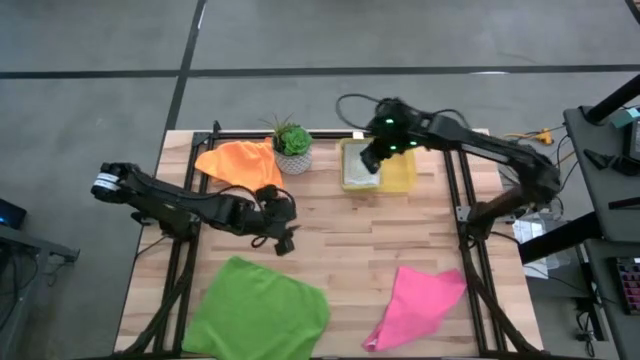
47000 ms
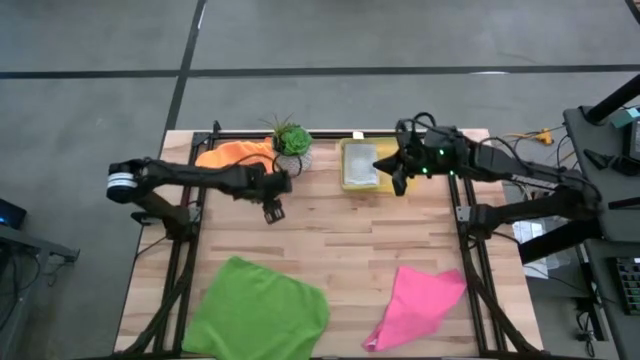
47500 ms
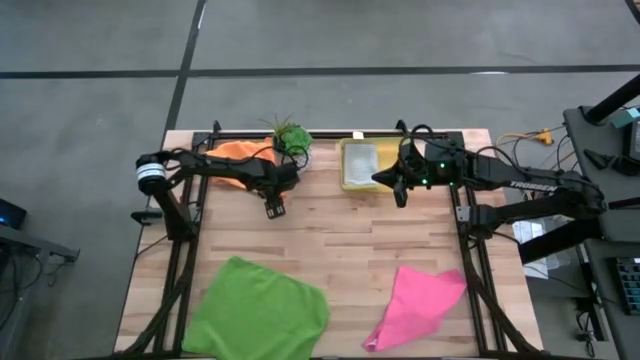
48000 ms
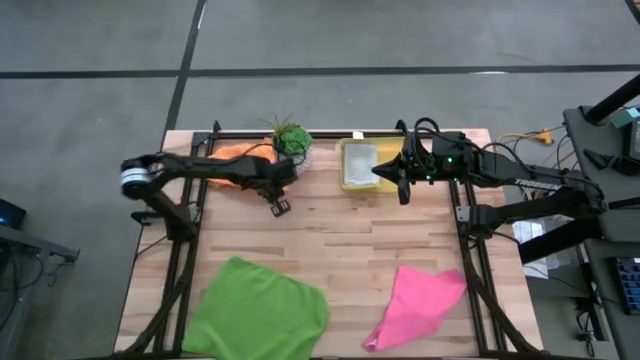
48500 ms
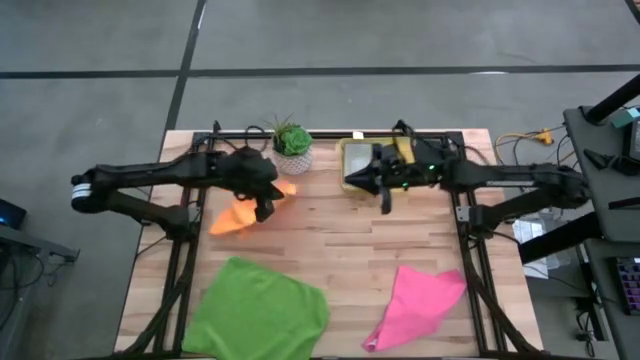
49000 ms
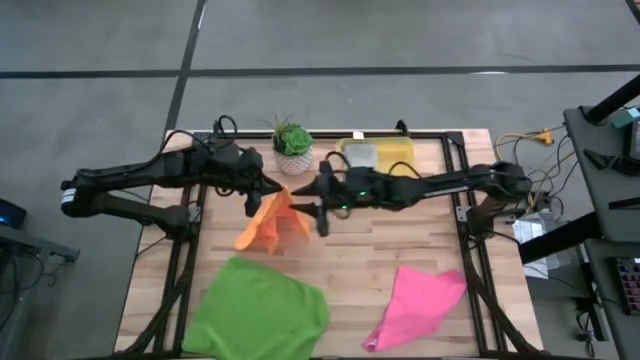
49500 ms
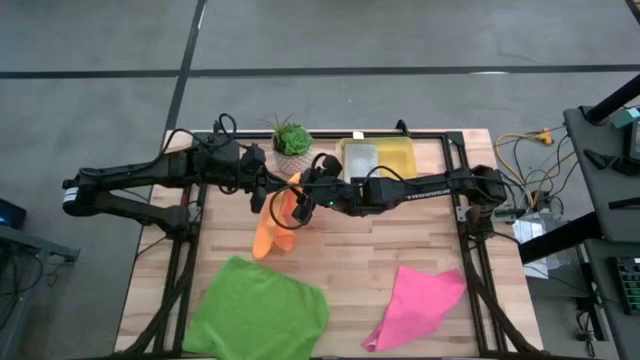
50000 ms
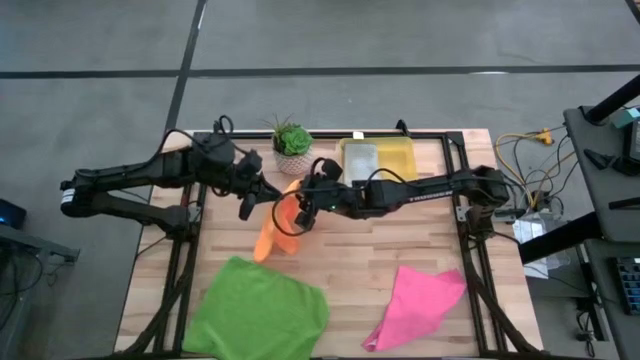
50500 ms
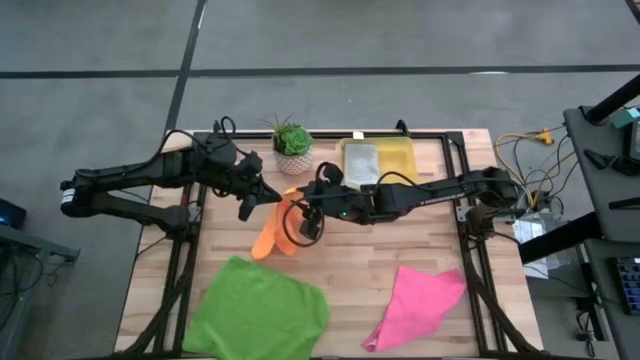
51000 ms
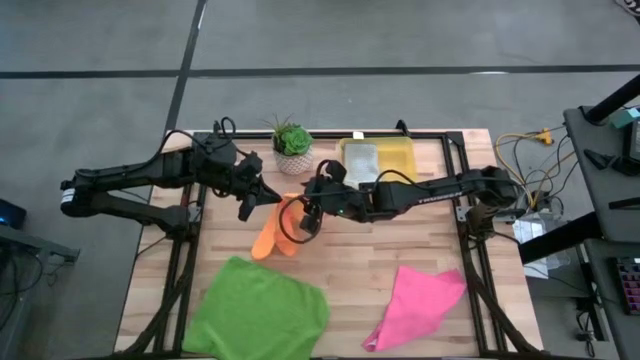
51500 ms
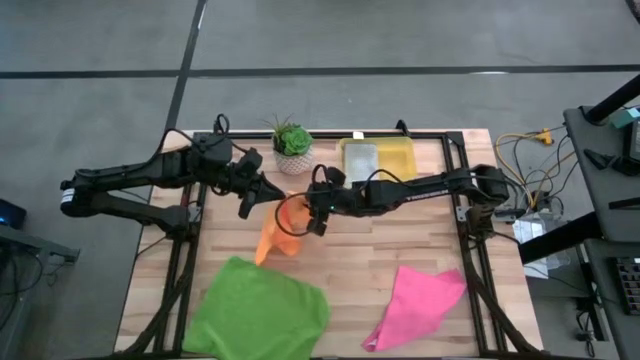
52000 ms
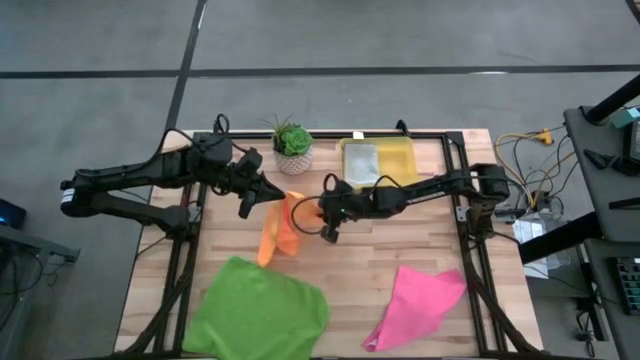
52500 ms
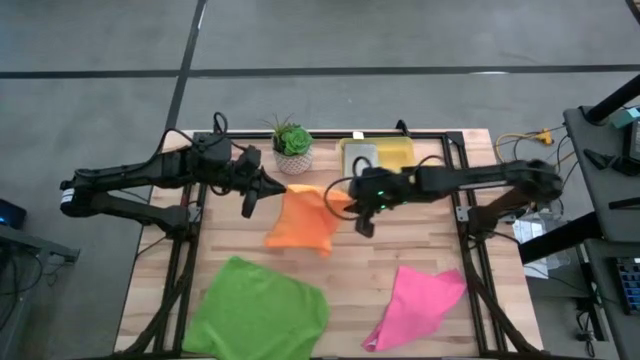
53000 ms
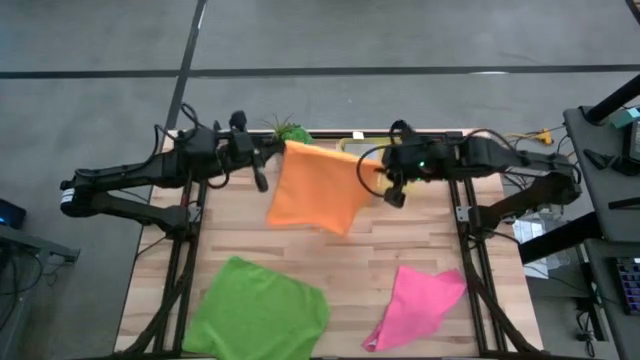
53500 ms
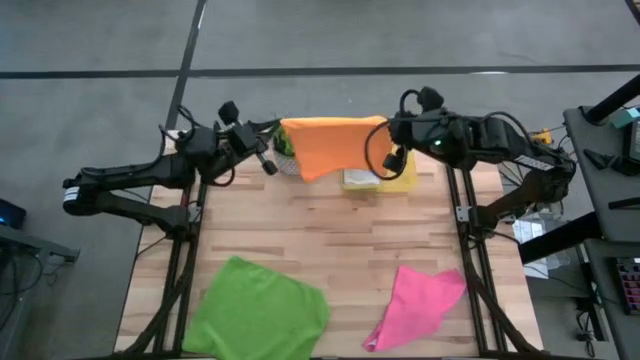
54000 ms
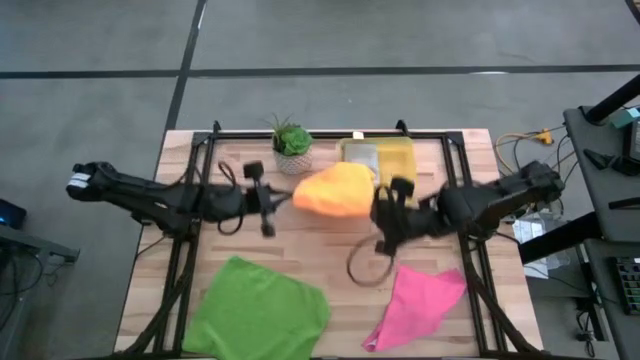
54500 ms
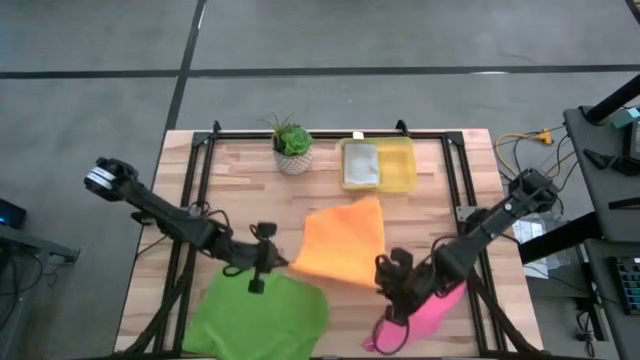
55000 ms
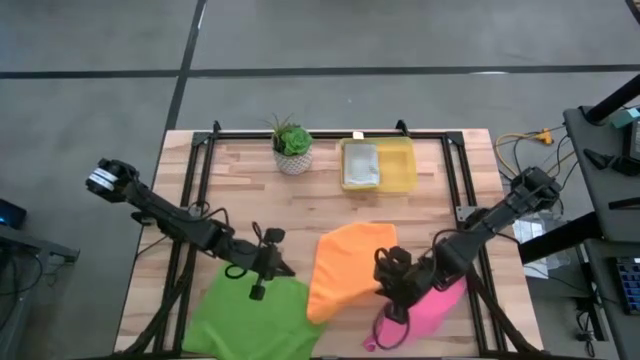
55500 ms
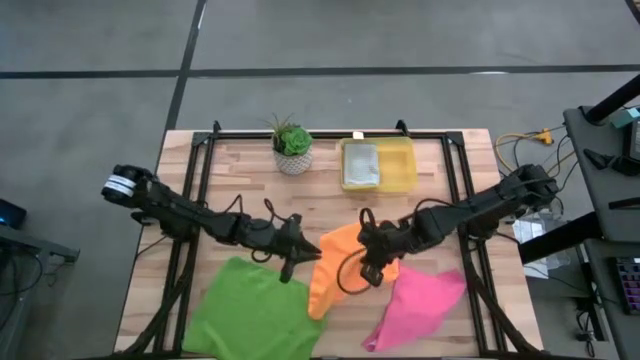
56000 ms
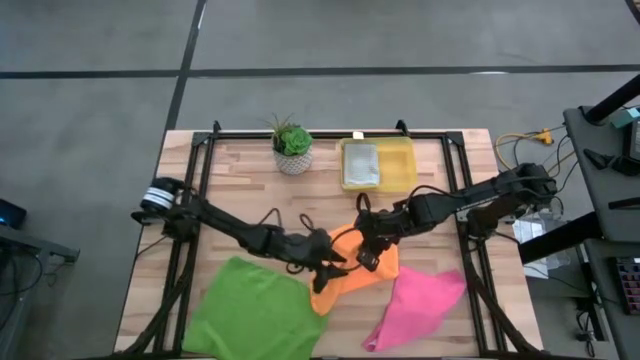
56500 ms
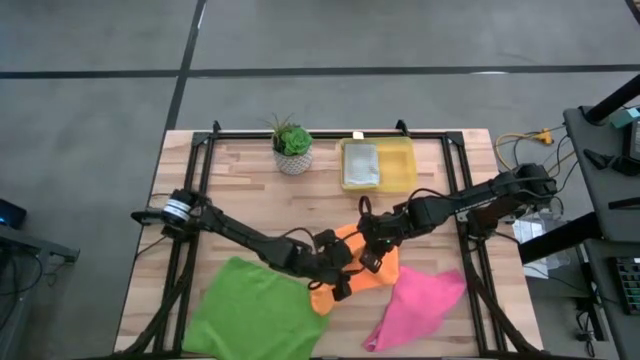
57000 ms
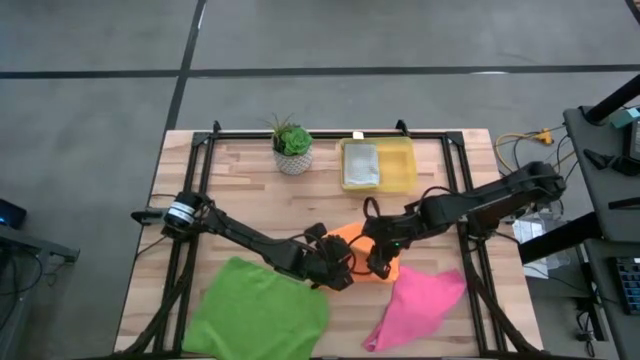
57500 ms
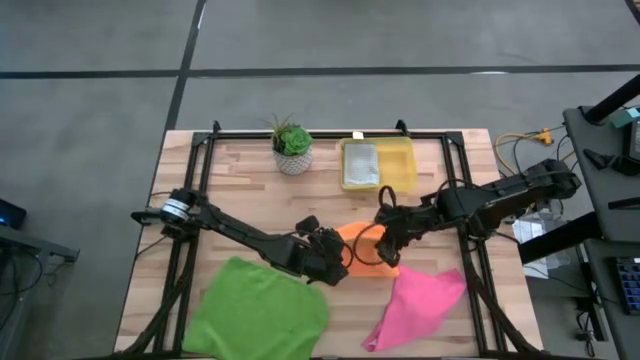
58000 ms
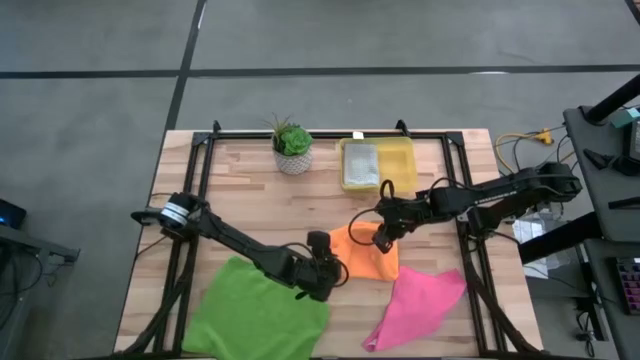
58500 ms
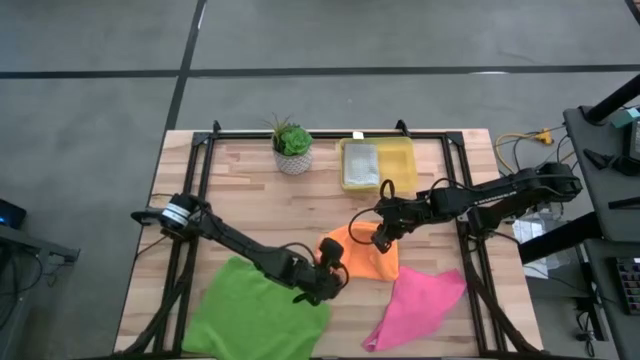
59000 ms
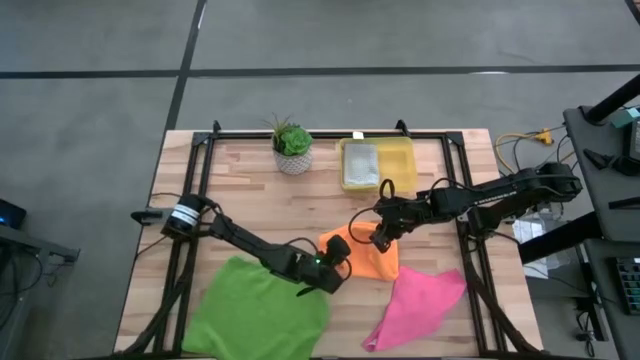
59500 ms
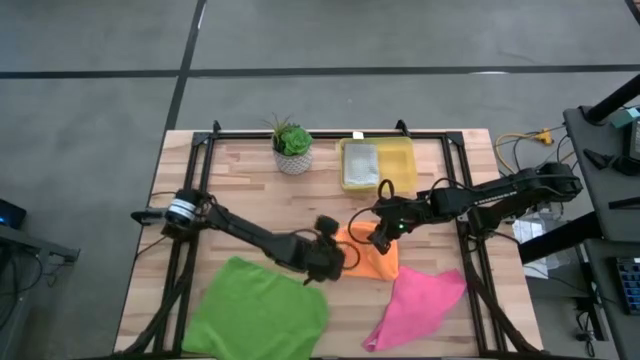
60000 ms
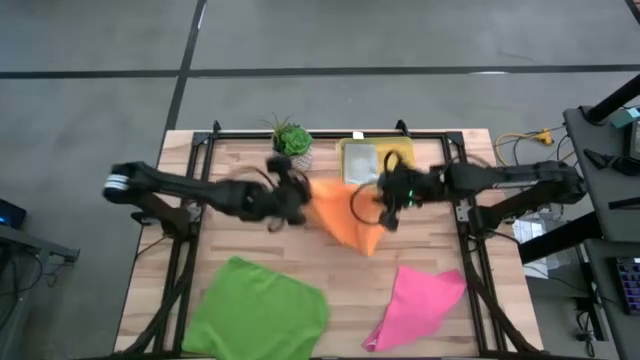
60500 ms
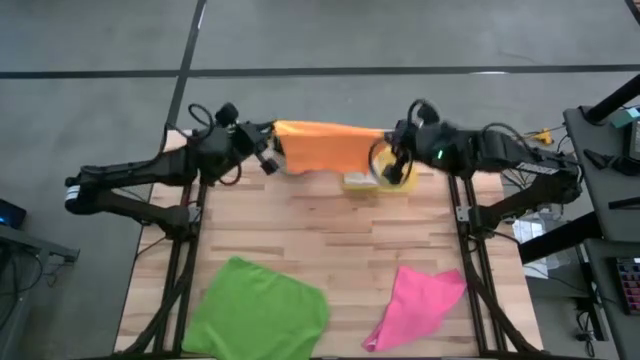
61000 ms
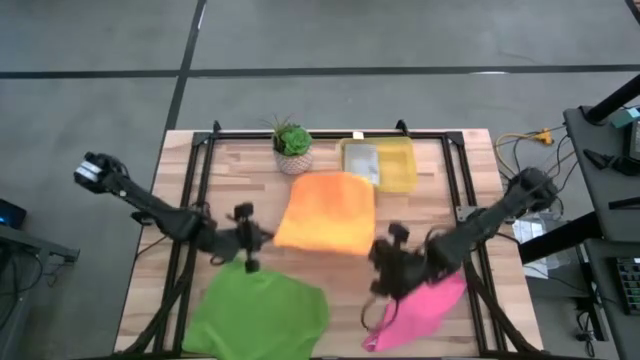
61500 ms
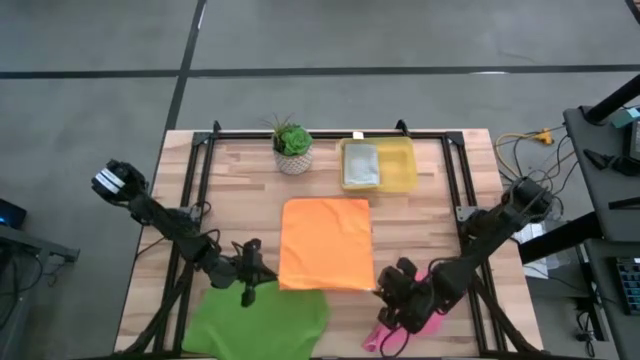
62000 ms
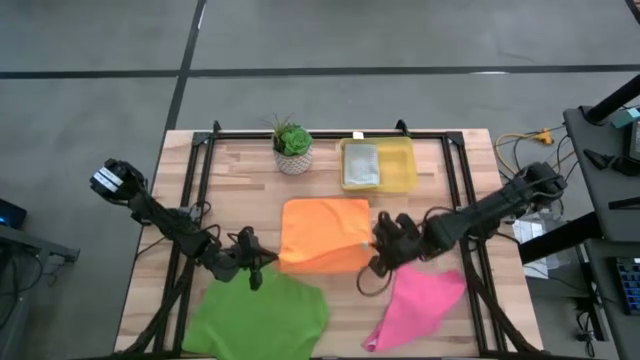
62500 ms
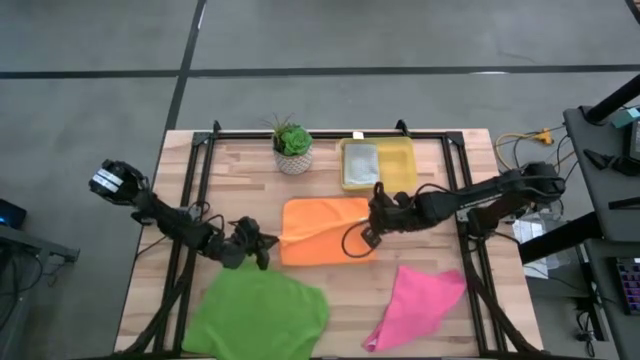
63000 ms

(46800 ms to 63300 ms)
Task: Fold microfiber towels
Fold the orange microfiber cloth

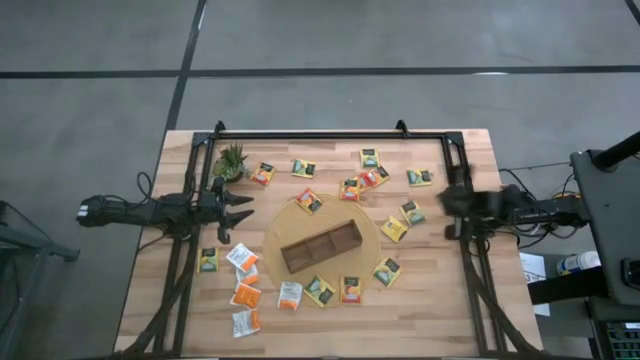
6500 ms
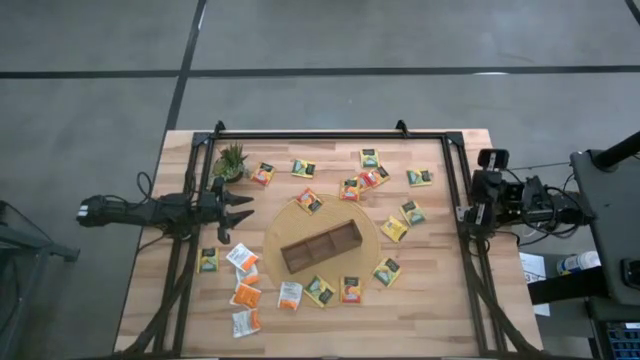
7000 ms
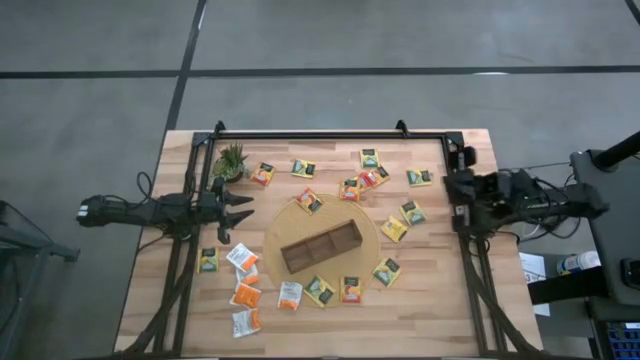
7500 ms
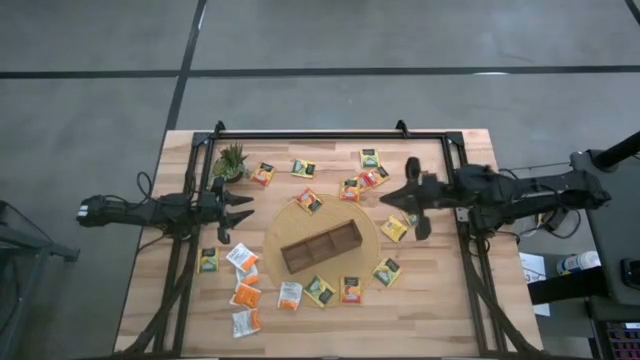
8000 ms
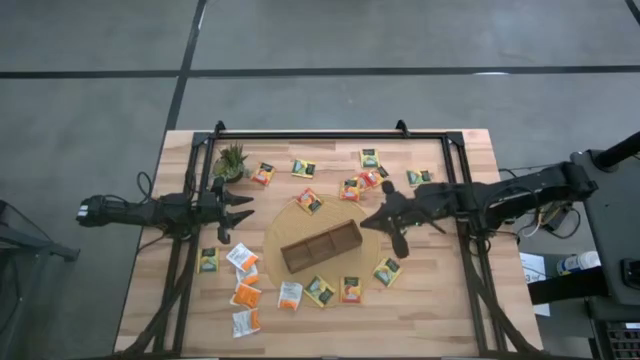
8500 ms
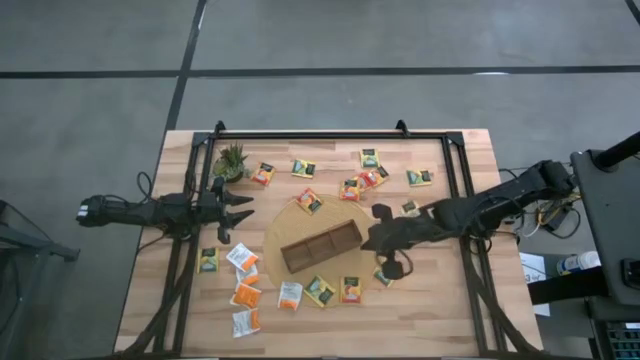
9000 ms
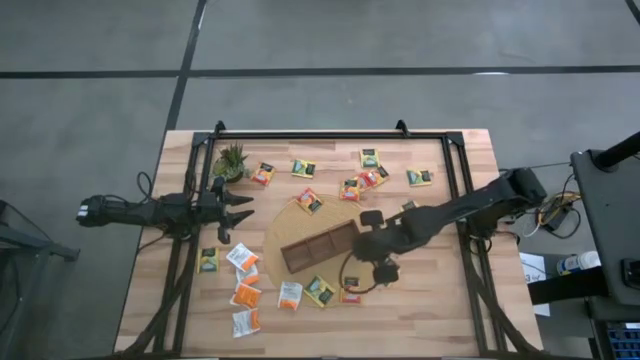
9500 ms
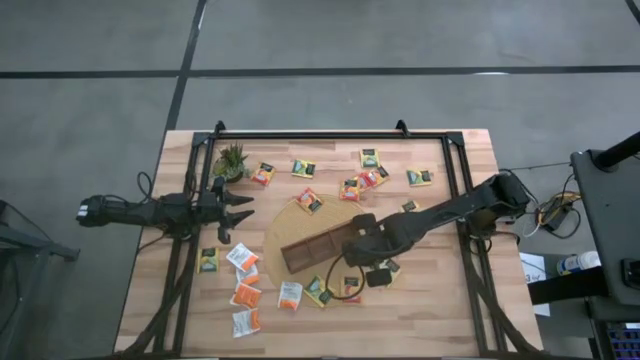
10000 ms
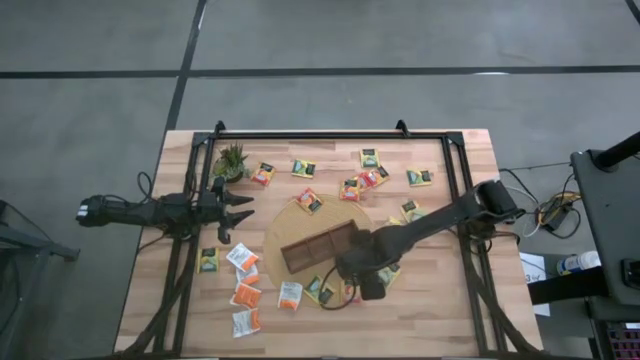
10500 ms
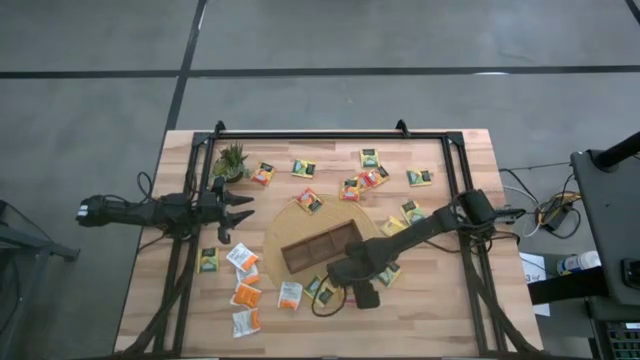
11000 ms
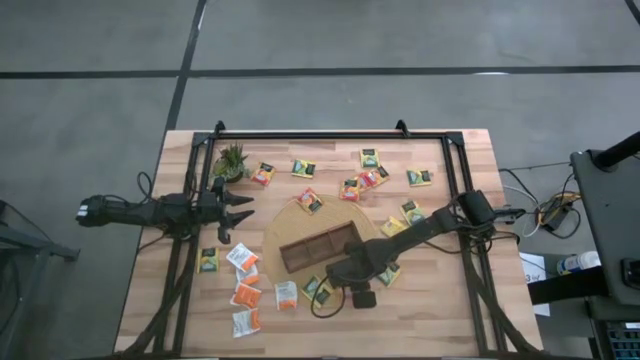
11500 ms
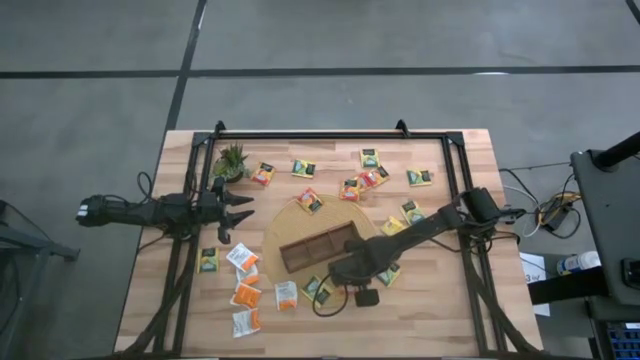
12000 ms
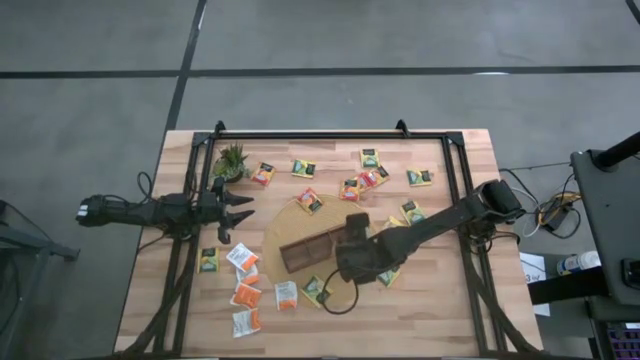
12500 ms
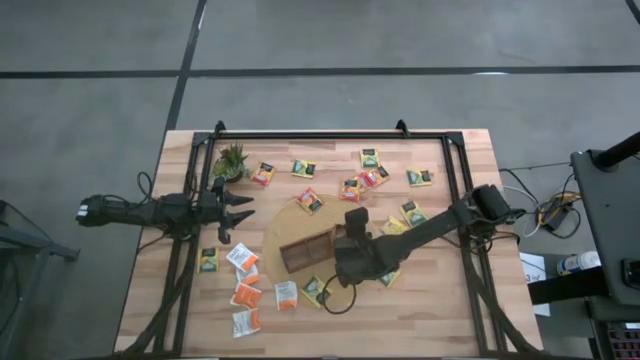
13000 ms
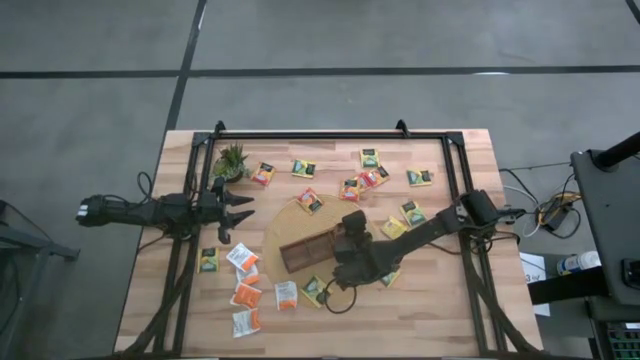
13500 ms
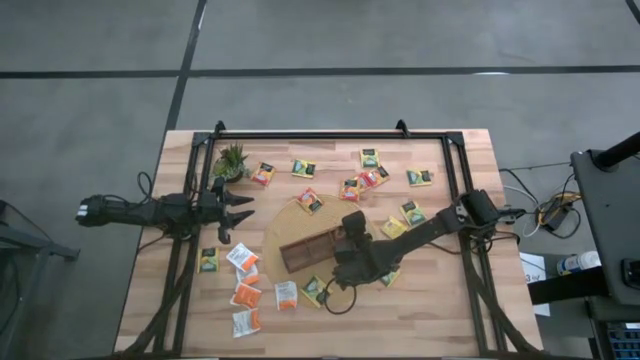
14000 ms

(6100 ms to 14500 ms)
Task: Pick & Place Tea
Put the orange tea bag into the right section of the wooden organizer
